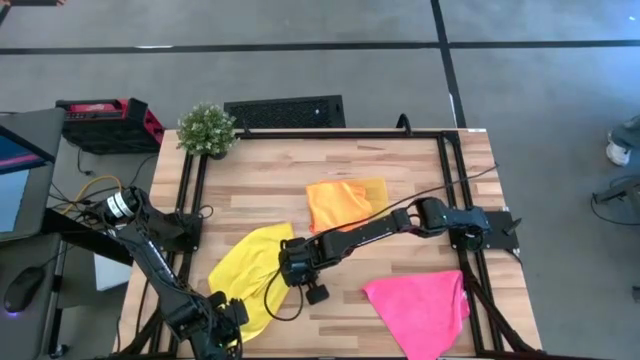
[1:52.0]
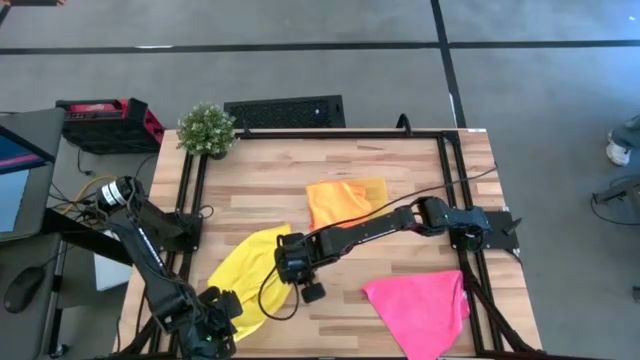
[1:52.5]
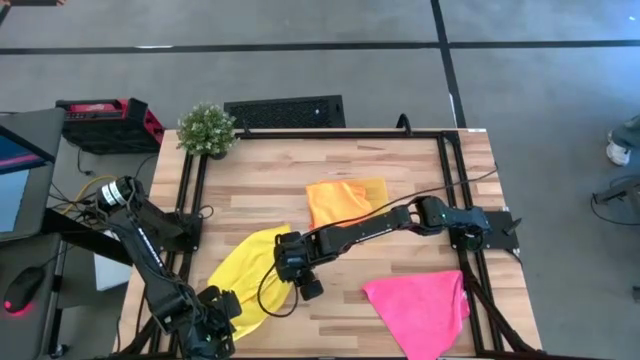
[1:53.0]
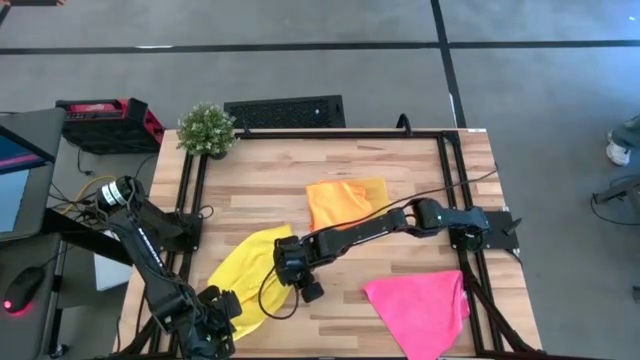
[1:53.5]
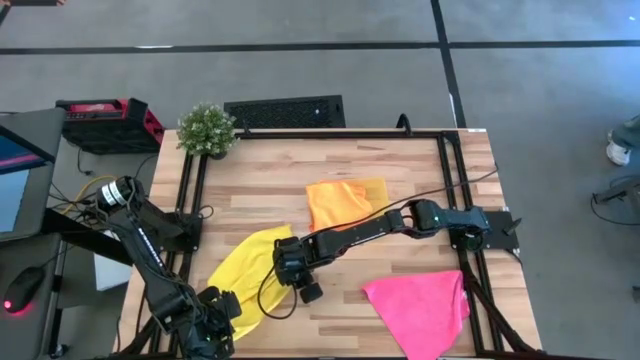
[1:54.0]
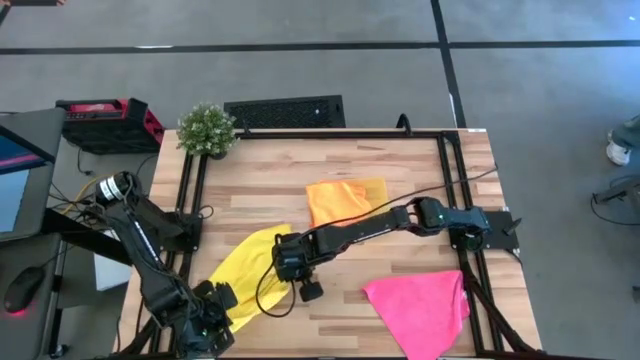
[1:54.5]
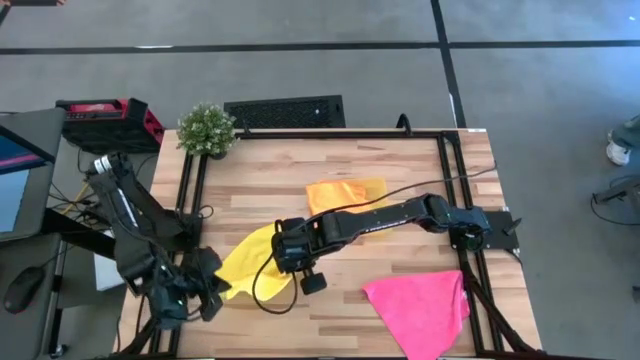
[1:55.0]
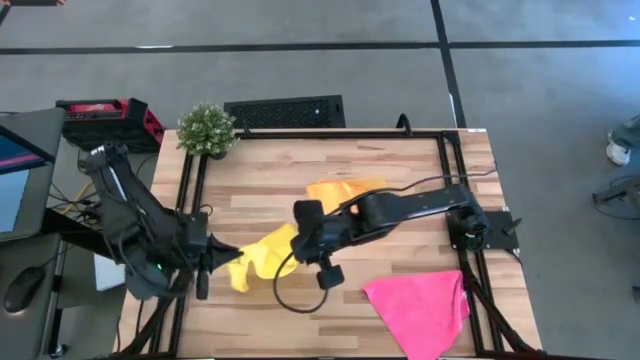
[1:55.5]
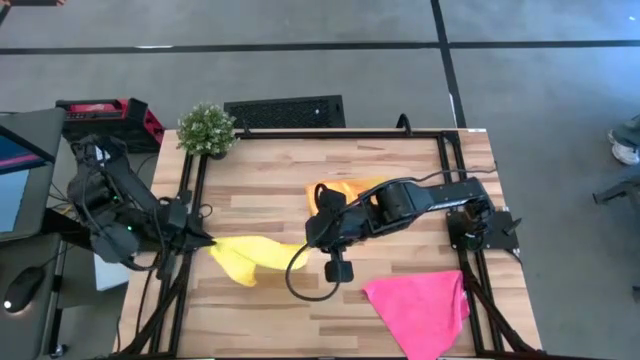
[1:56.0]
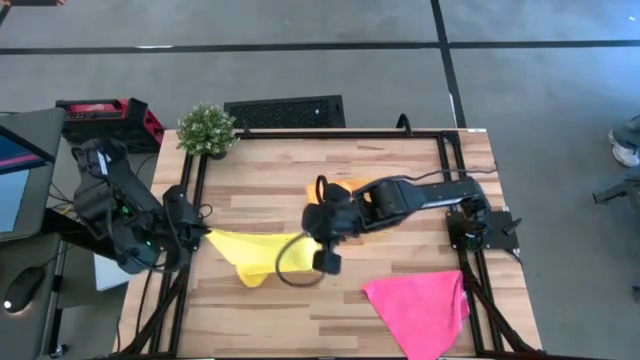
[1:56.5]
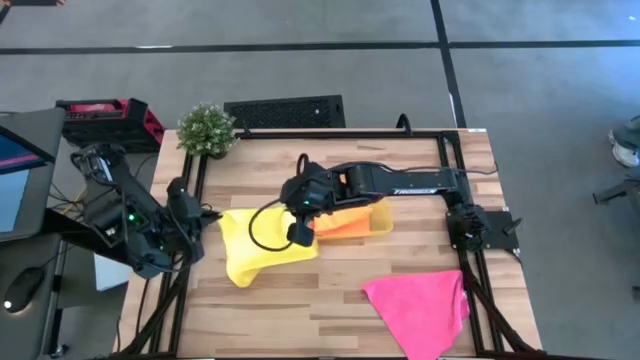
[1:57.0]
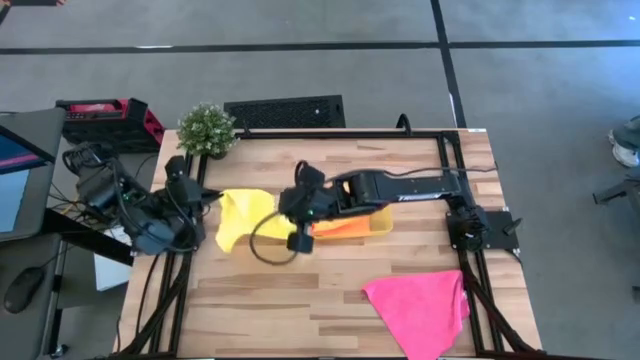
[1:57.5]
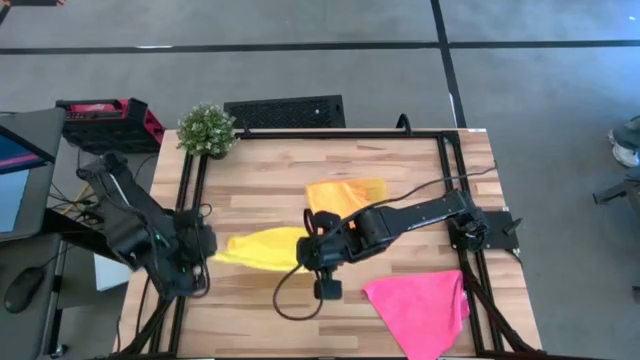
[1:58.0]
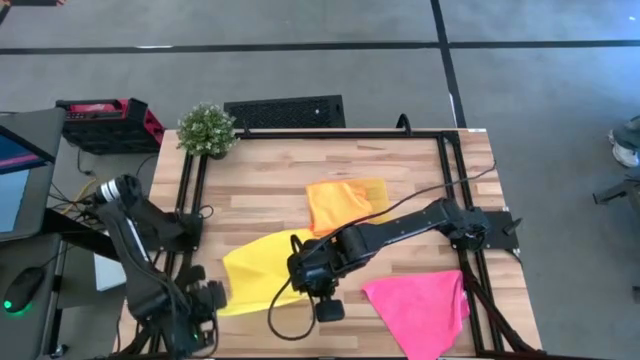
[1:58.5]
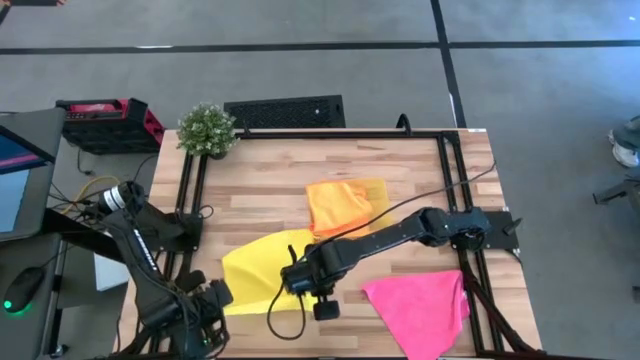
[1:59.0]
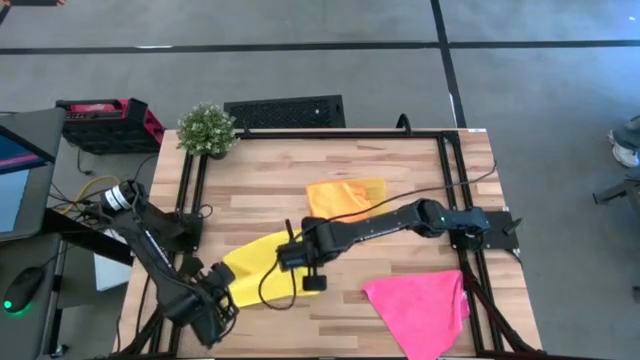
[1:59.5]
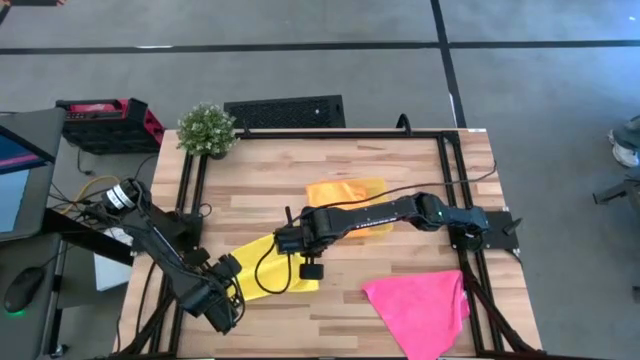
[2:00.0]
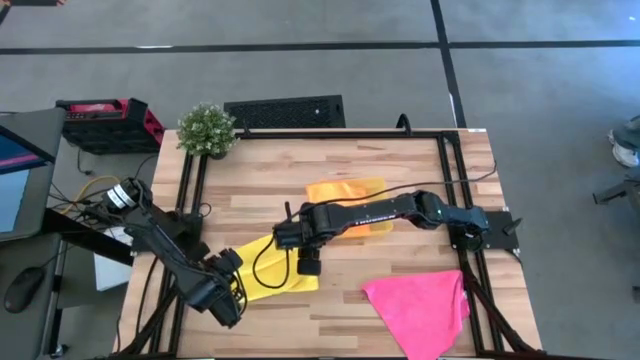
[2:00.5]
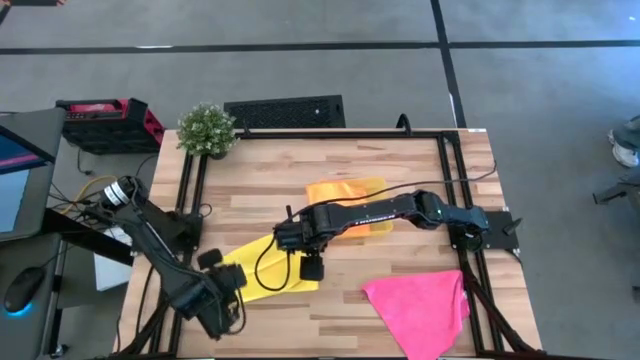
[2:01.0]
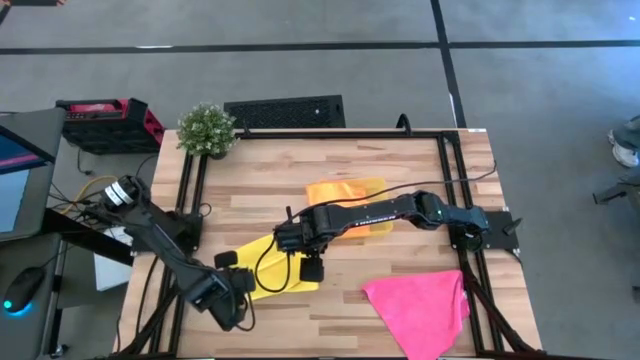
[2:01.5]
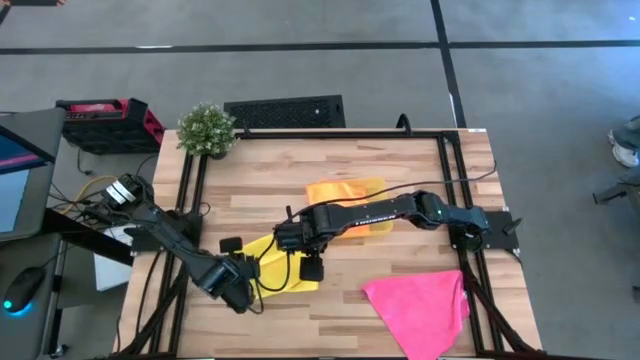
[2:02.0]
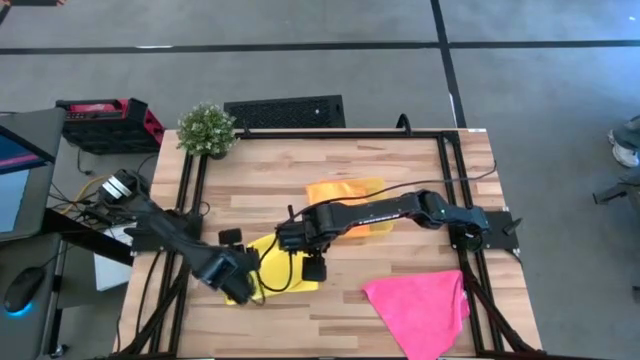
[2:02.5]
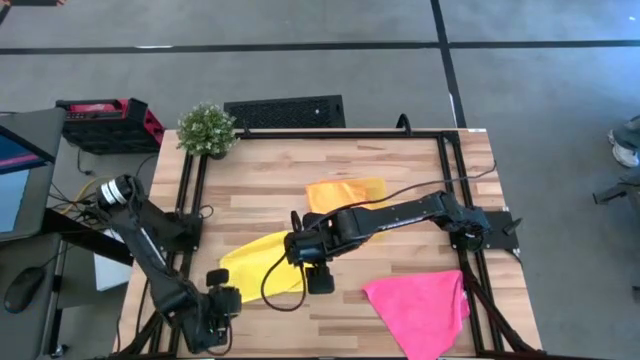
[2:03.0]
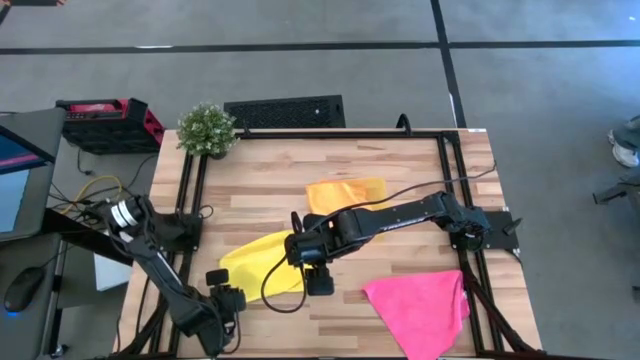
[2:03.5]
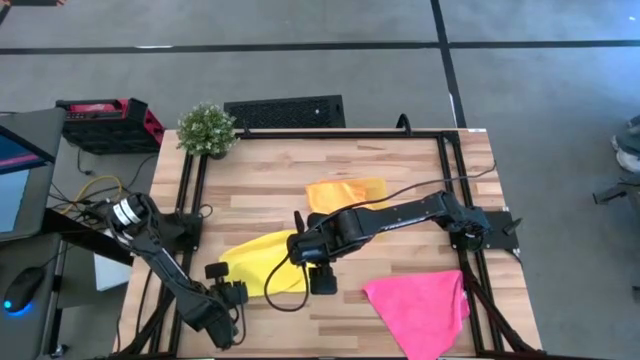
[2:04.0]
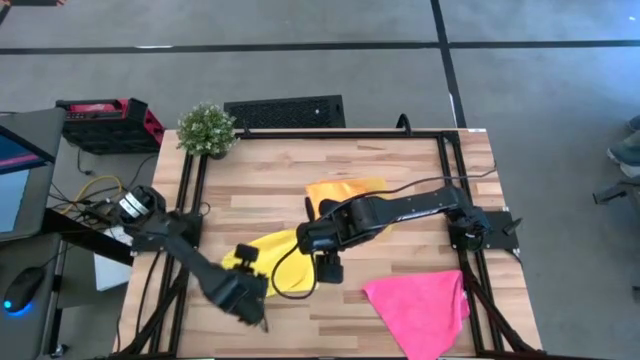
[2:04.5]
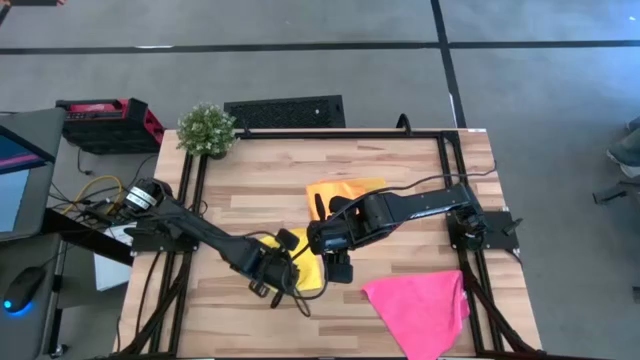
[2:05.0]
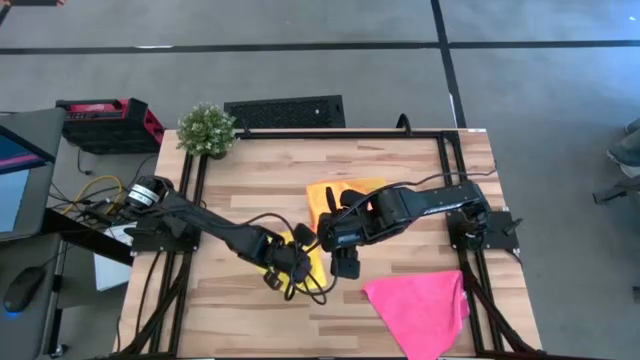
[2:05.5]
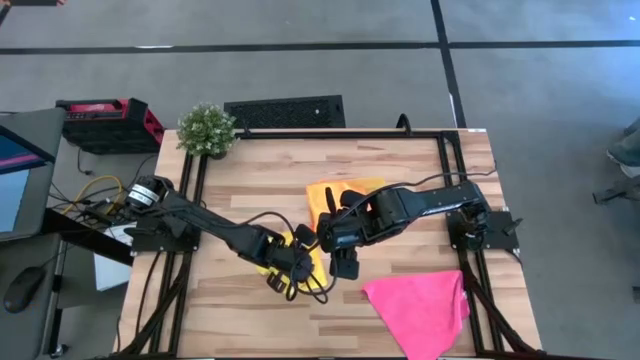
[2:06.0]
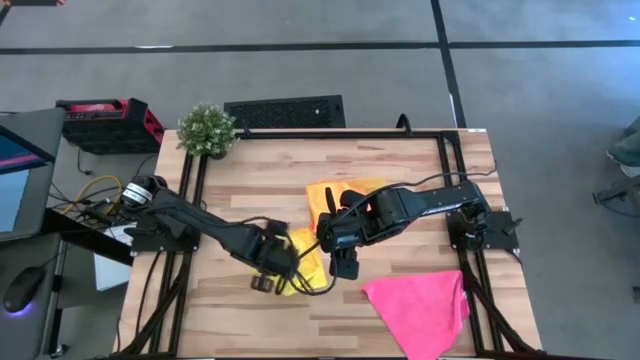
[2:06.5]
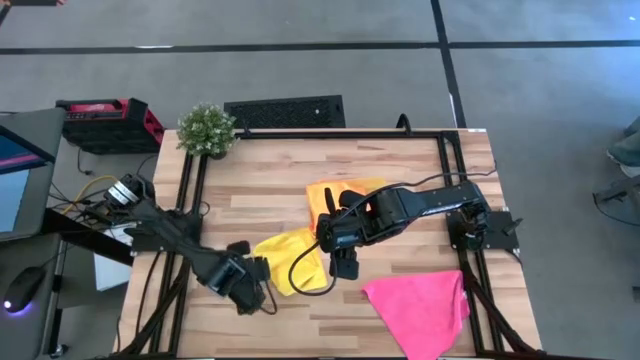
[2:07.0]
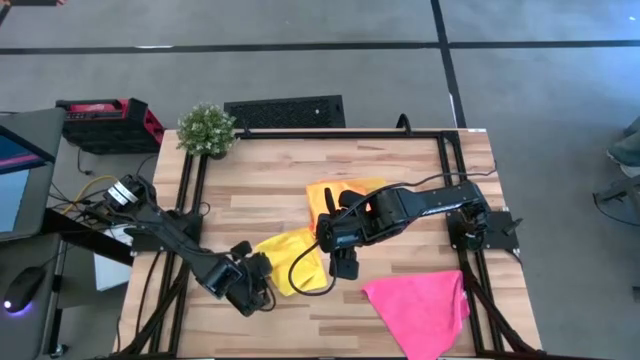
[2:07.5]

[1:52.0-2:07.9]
Task: Fold microfiber towels
Fold the yellow microfiber towel

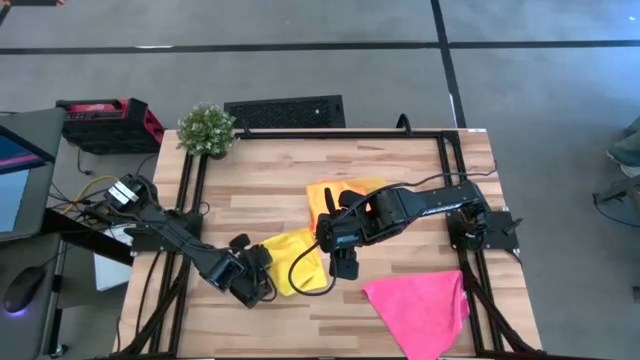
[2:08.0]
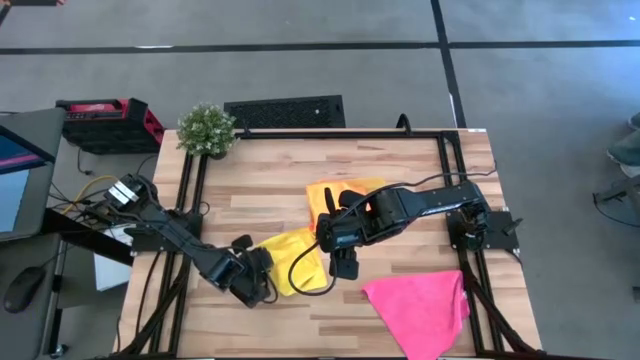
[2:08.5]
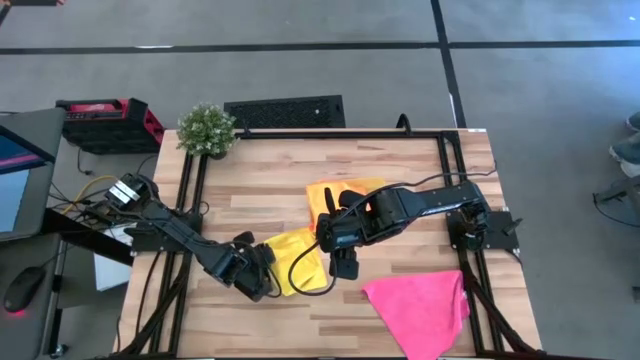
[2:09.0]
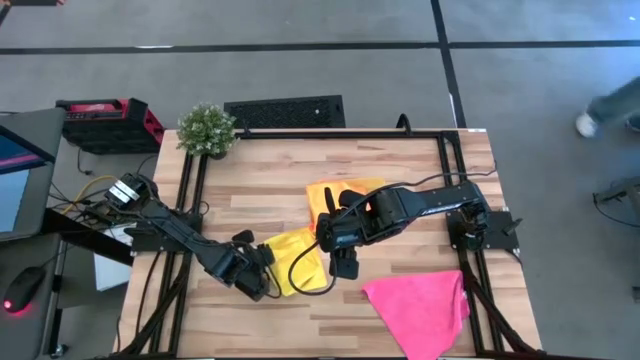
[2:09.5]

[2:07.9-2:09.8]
Fold the yellow microfiber towel

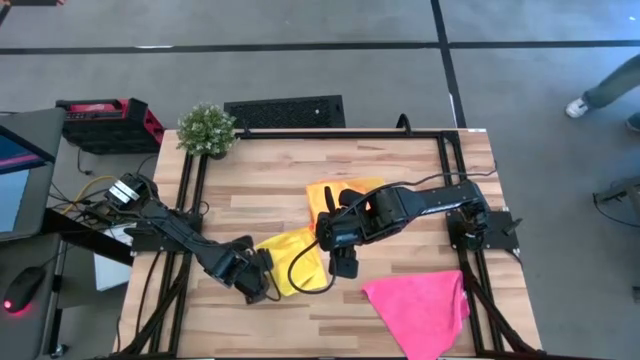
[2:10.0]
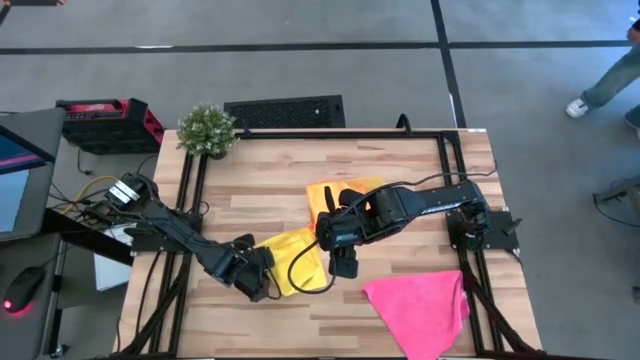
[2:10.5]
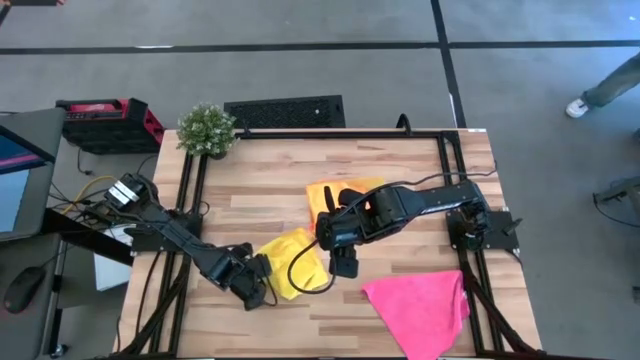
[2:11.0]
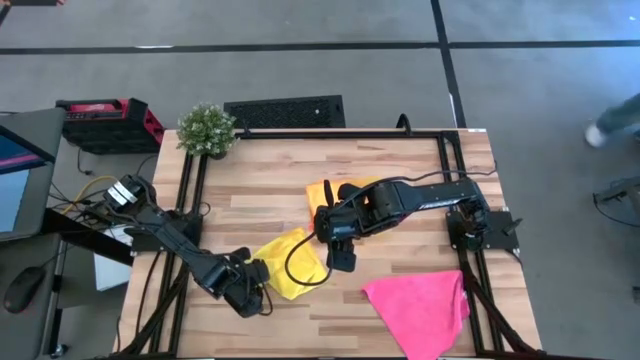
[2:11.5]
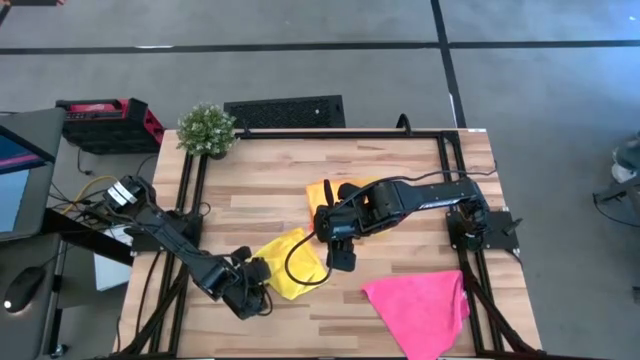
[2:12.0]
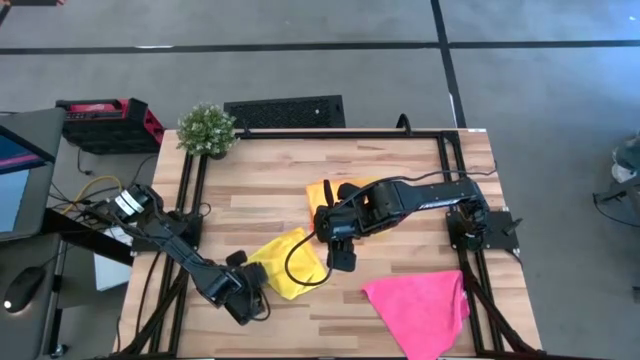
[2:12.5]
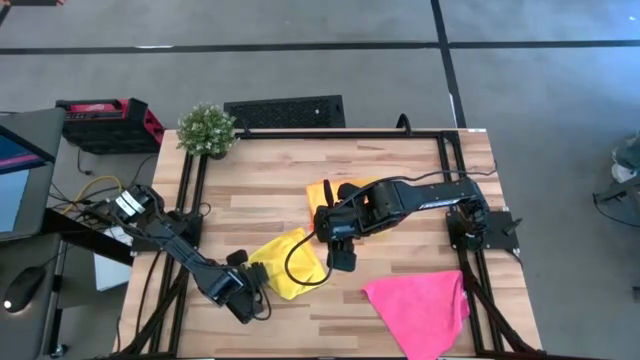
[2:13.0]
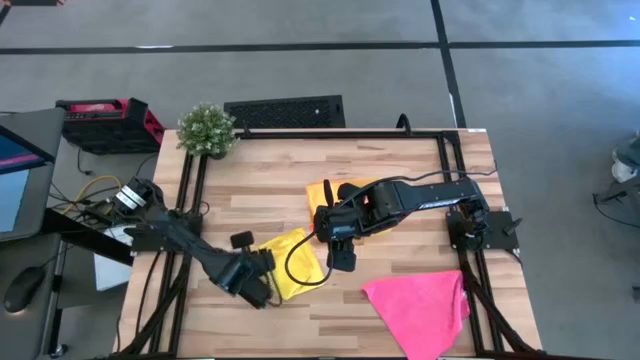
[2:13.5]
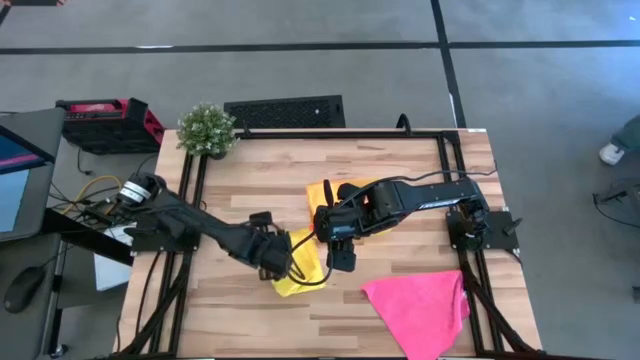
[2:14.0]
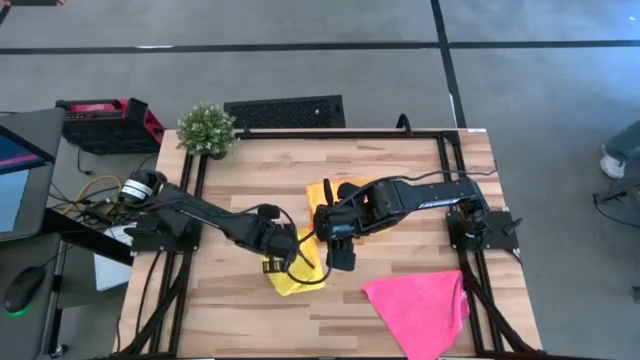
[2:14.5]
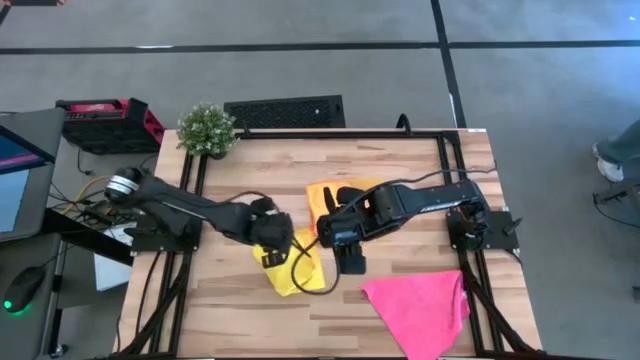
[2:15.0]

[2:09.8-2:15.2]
Fold the yellow microfiber towel
